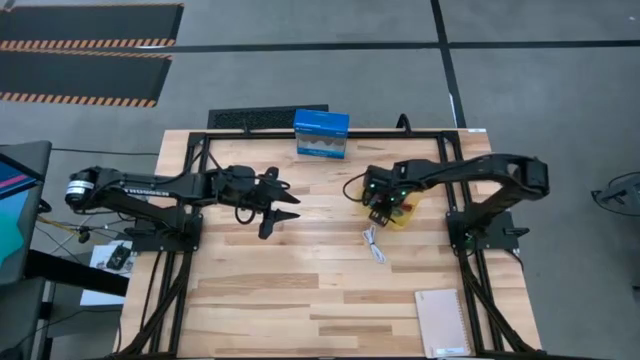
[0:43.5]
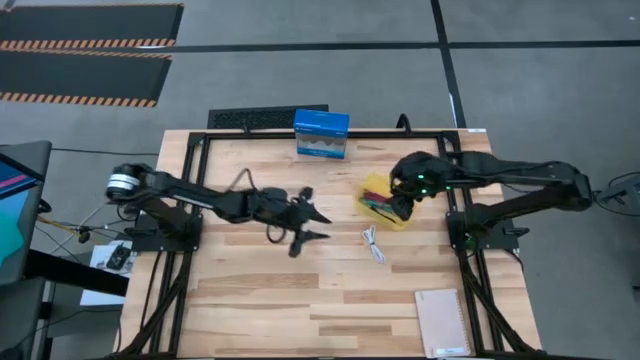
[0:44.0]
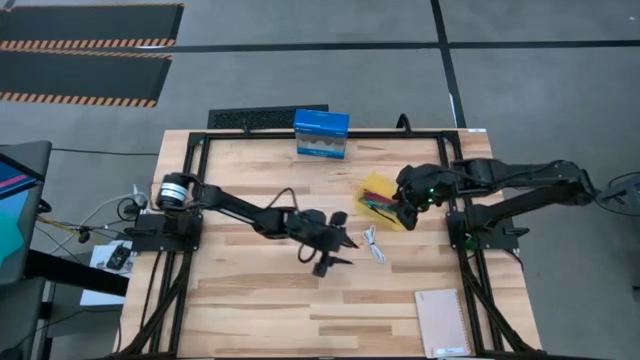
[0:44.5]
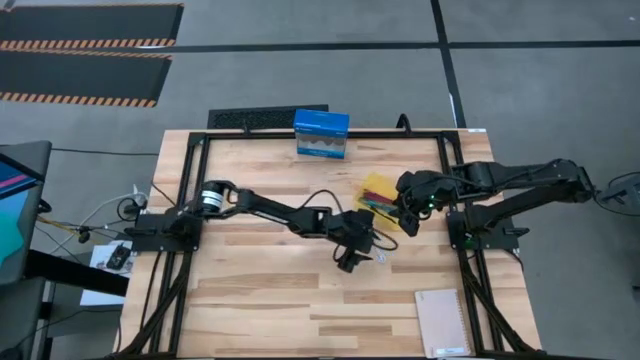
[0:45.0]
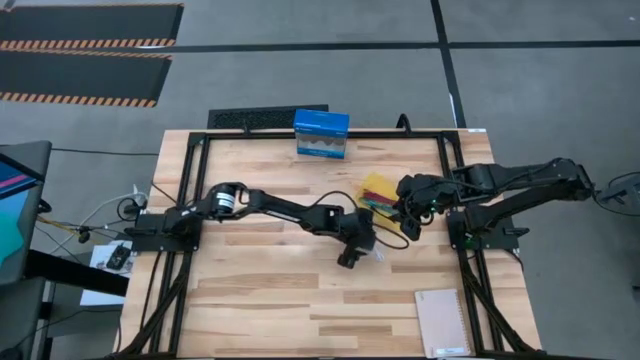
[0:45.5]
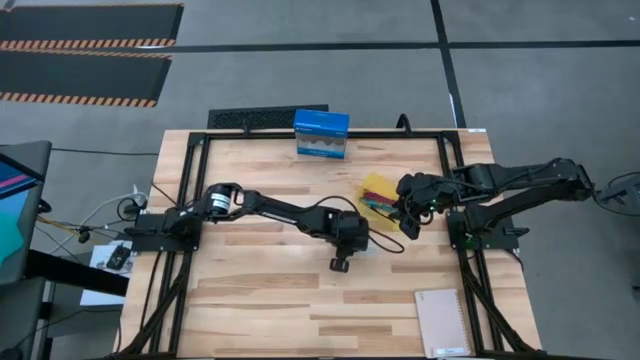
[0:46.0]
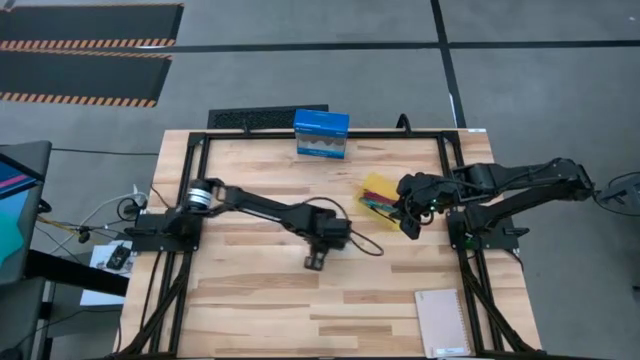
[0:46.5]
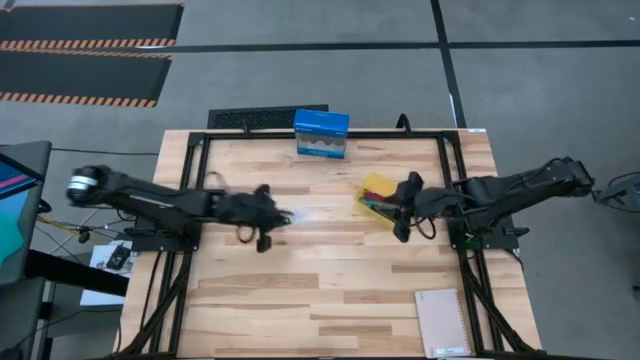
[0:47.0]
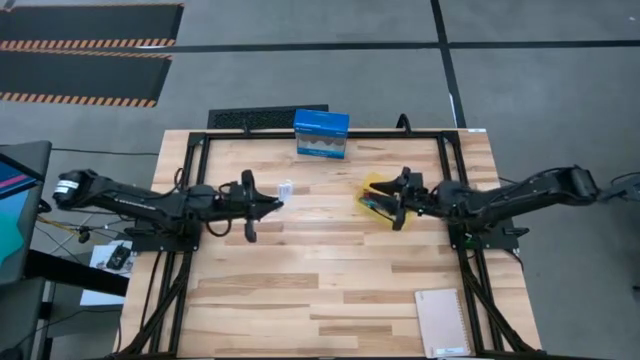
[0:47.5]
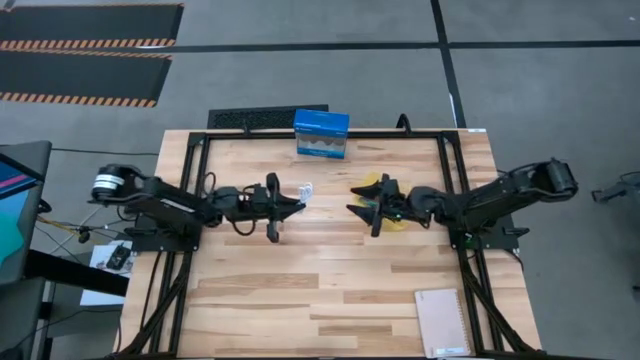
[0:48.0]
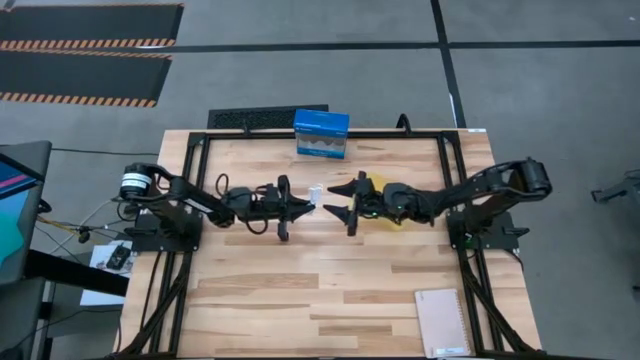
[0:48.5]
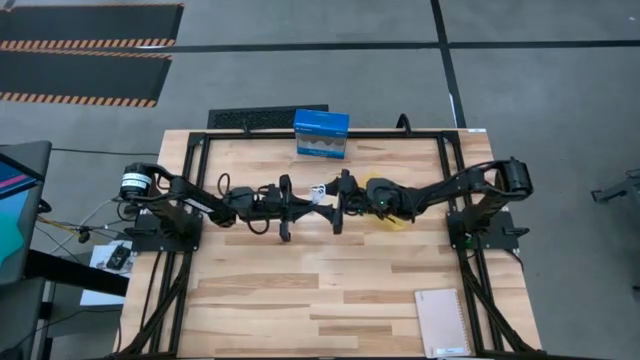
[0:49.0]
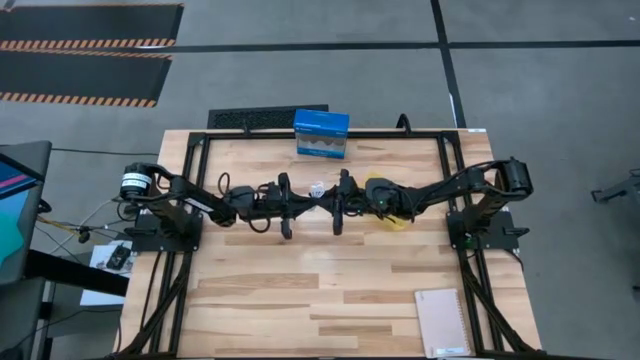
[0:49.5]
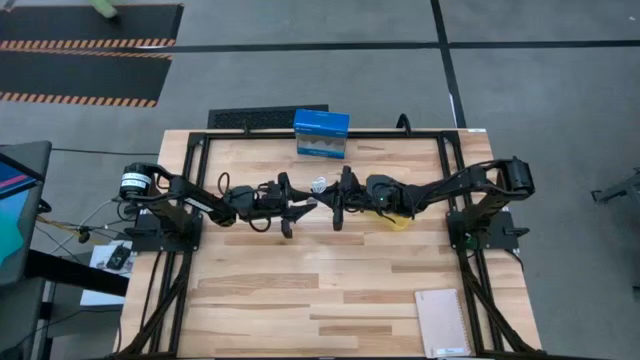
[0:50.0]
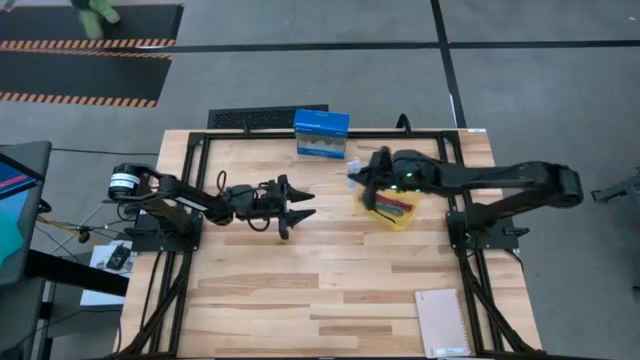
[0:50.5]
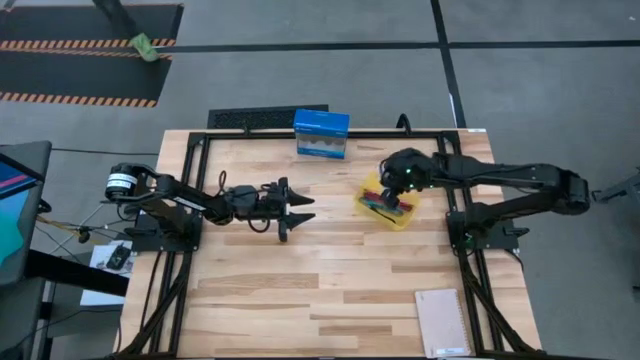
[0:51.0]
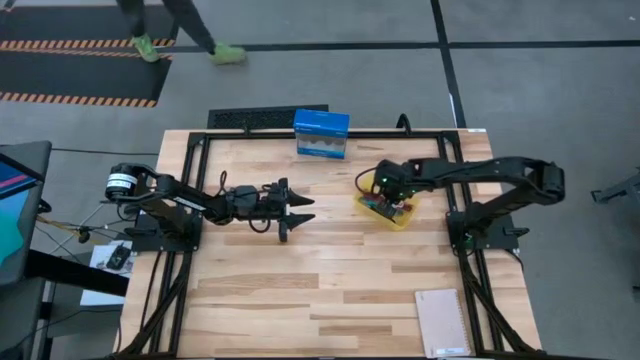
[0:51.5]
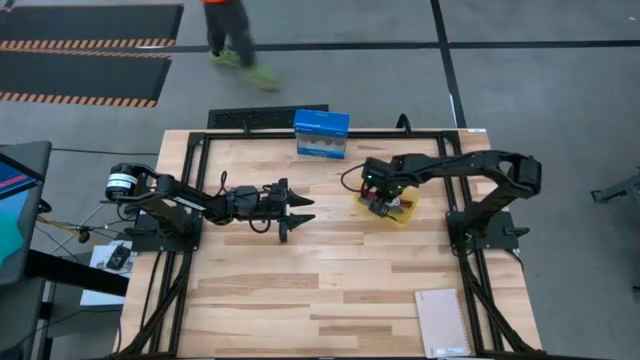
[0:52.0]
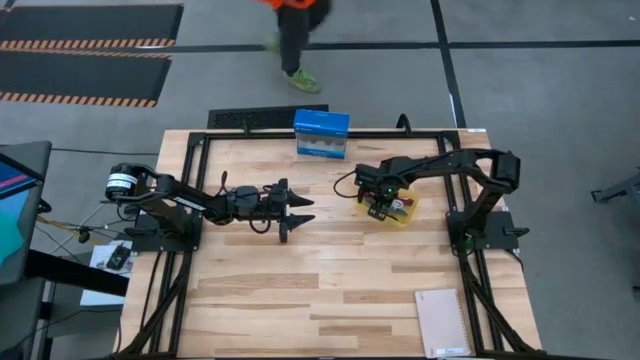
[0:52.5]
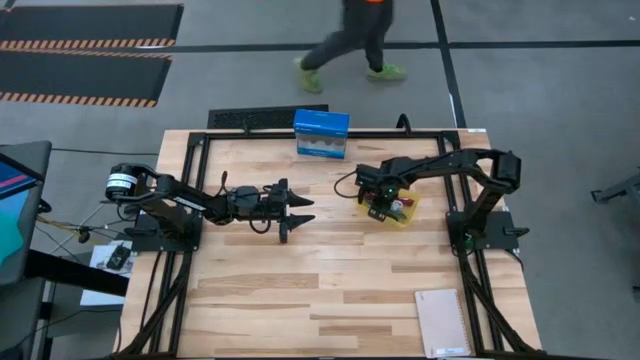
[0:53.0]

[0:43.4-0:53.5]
Task: Pick and place USB-C Cables
Put the white charger cable into the yellow bin

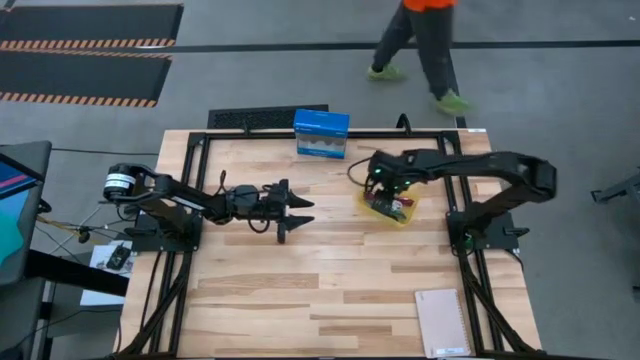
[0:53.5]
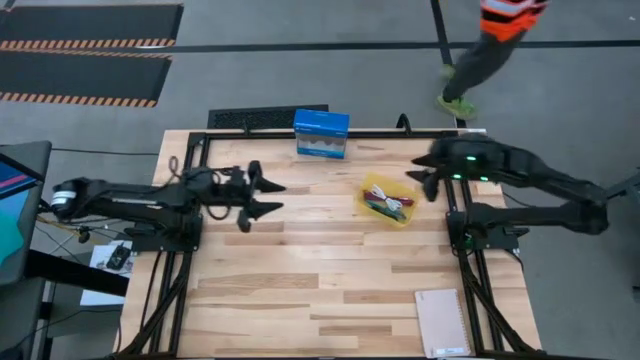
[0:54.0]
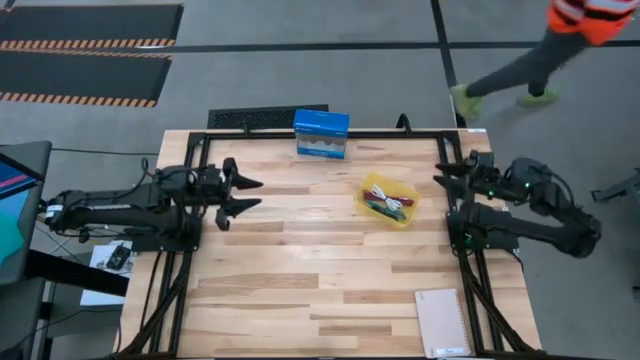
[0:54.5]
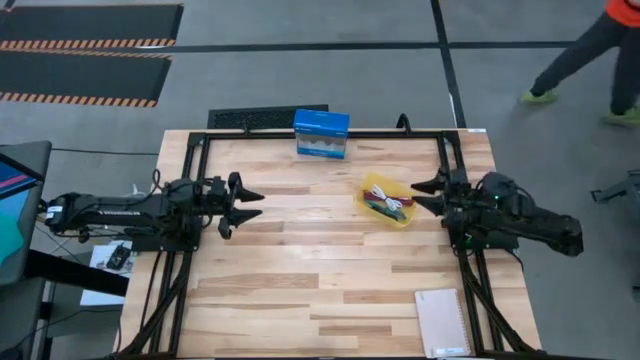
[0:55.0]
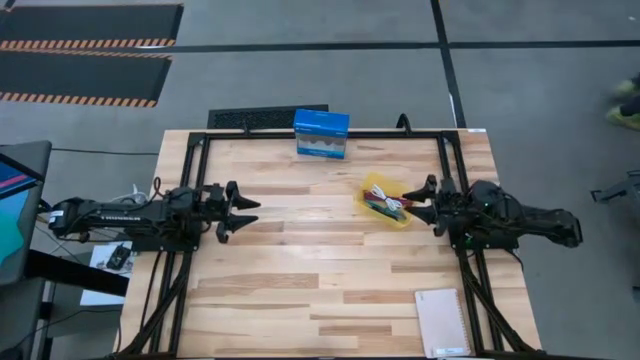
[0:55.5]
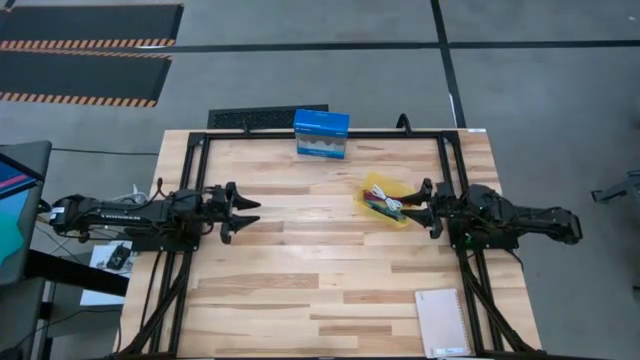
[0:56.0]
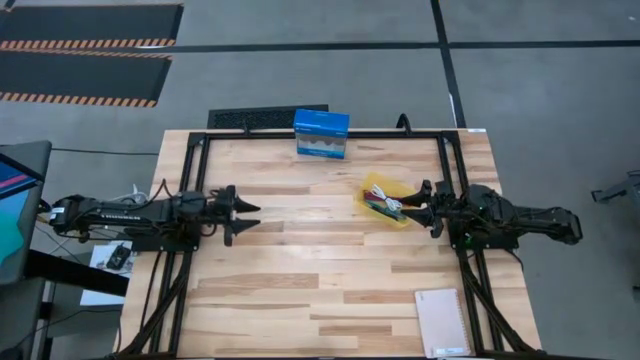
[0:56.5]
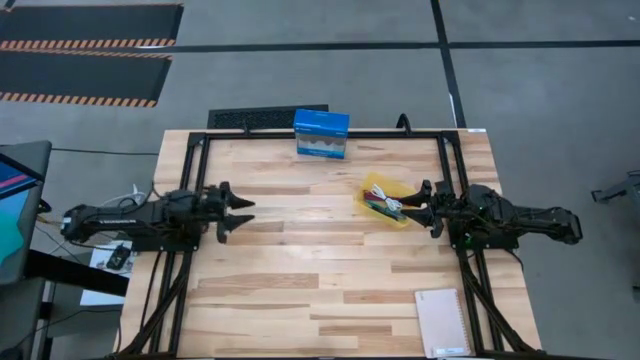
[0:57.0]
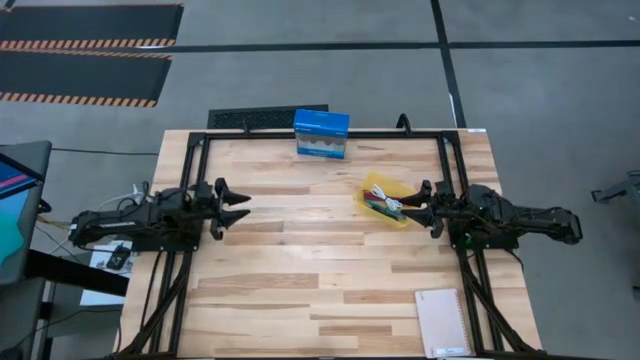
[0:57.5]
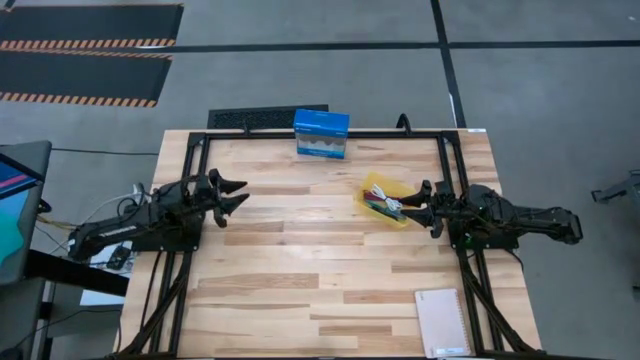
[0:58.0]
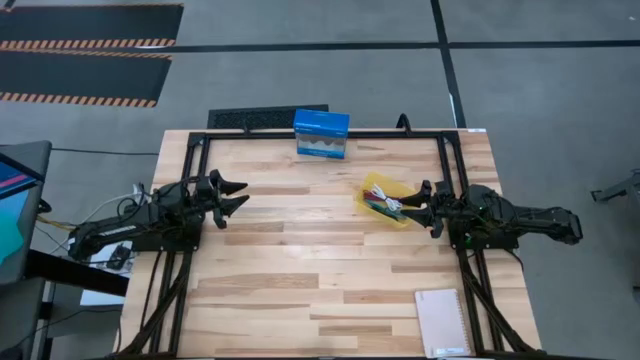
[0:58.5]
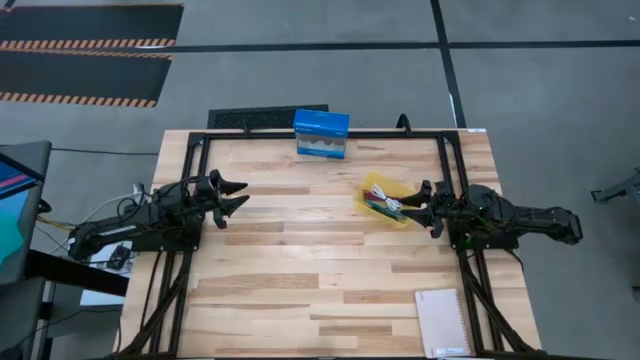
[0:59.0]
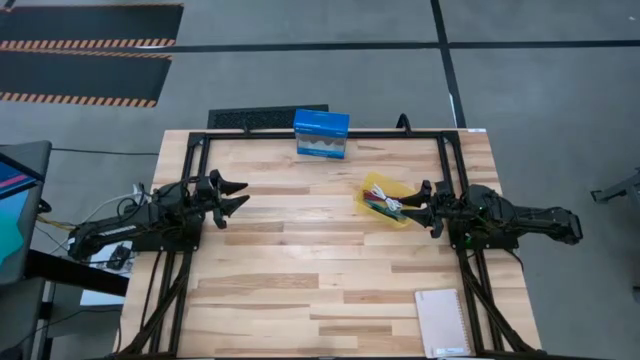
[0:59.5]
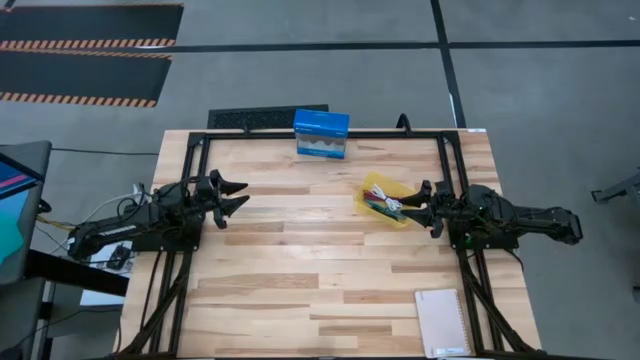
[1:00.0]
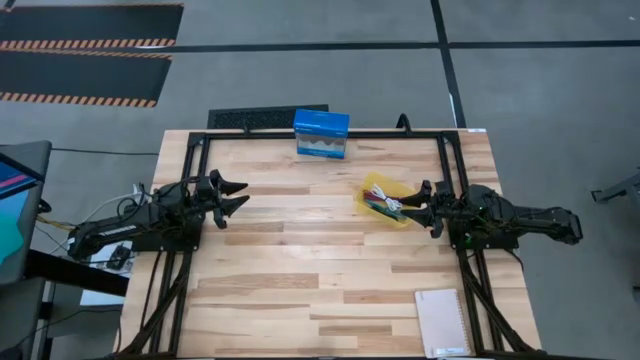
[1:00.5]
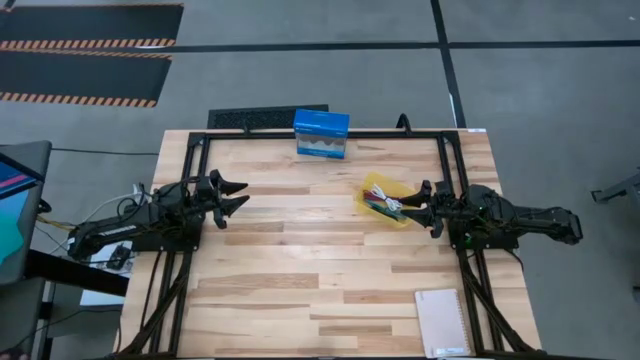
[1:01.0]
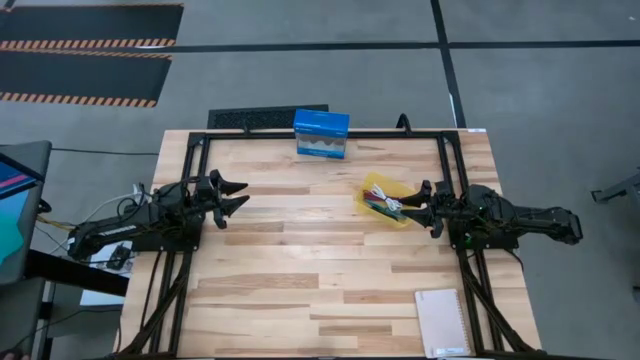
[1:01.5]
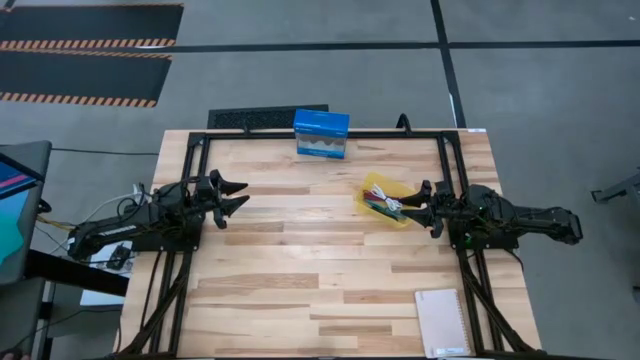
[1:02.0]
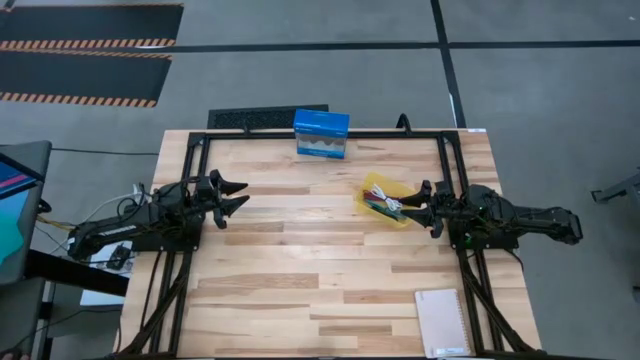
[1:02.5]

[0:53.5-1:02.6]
Return to Home Position

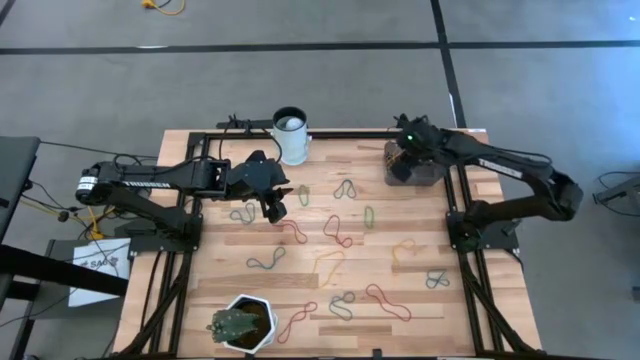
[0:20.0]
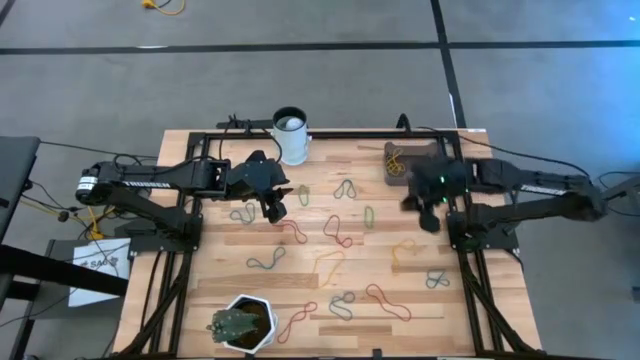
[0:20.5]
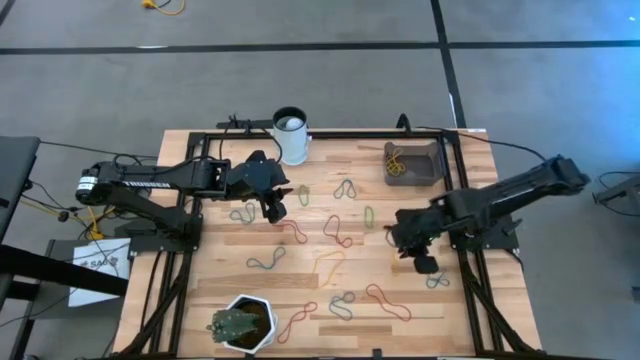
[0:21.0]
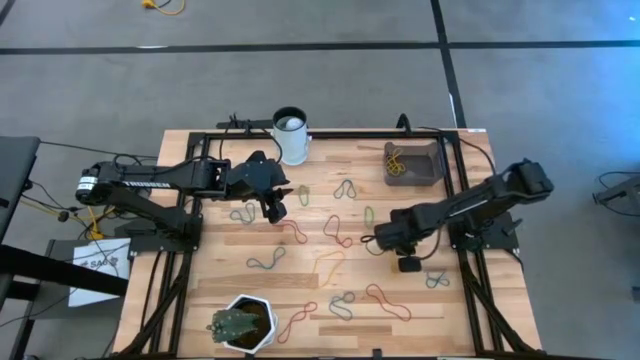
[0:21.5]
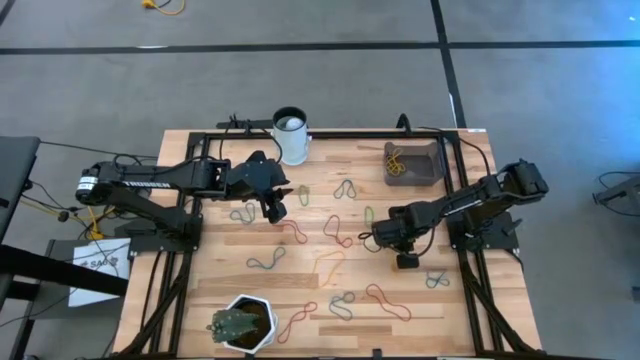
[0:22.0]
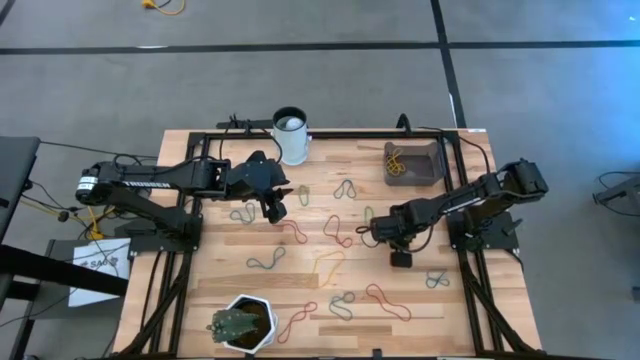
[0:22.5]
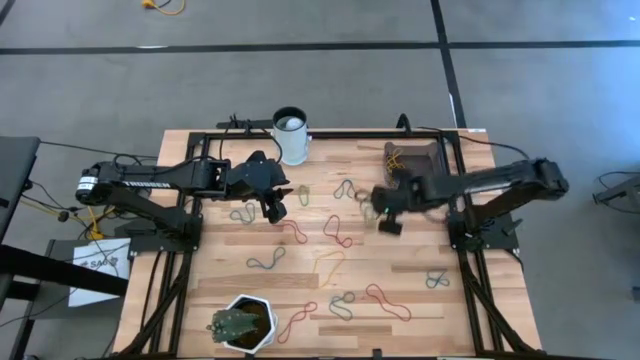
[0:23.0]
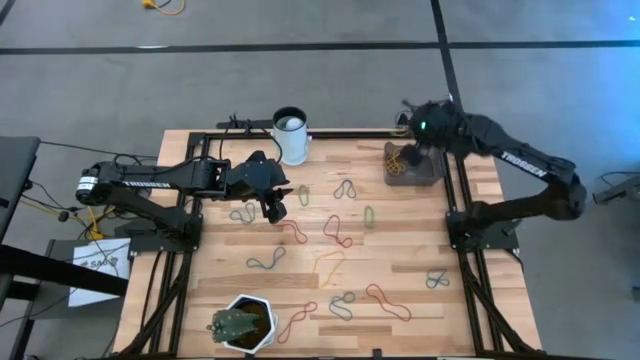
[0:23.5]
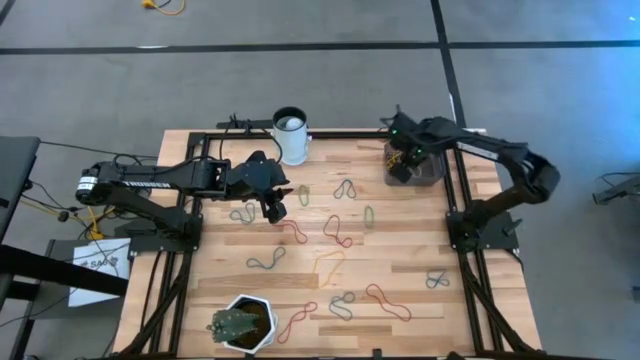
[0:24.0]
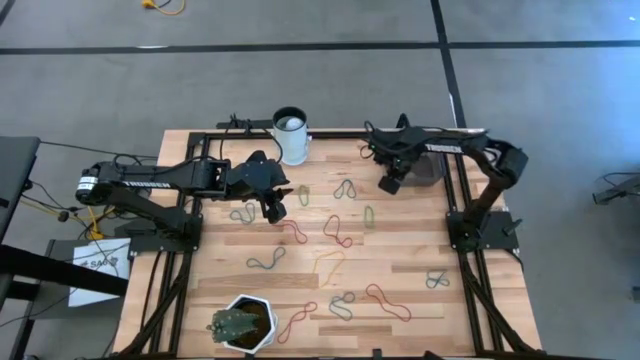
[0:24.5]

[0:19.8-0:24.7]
Task: Pick and place items into bin
Put the right yellow band into the bin
